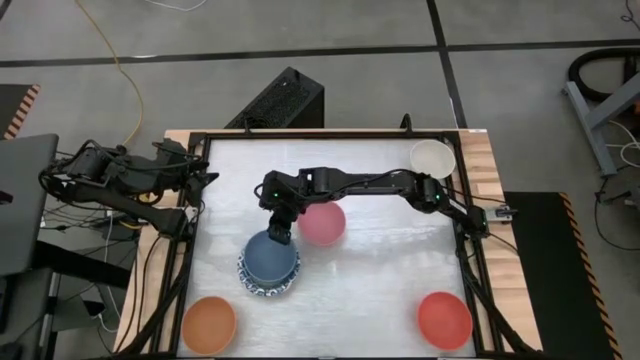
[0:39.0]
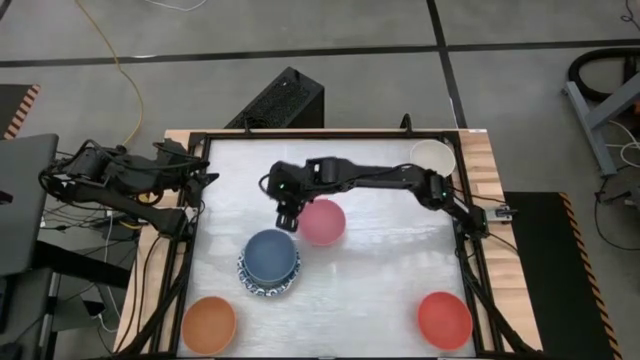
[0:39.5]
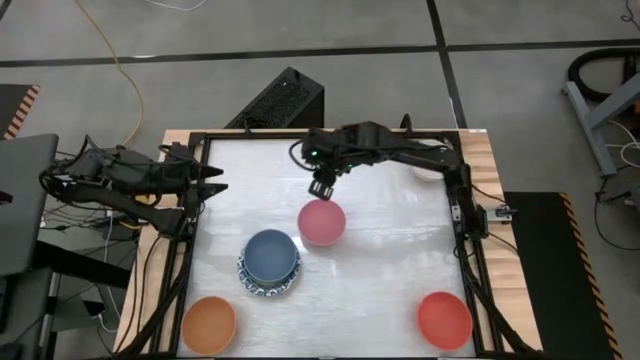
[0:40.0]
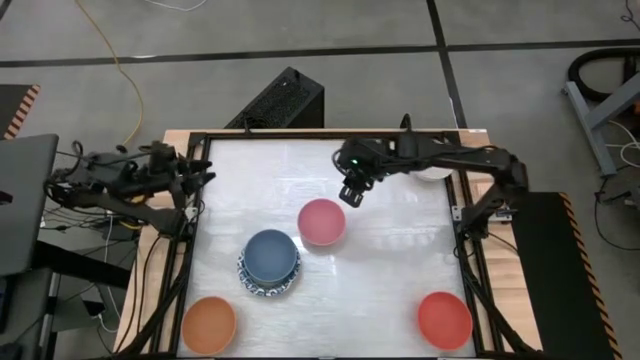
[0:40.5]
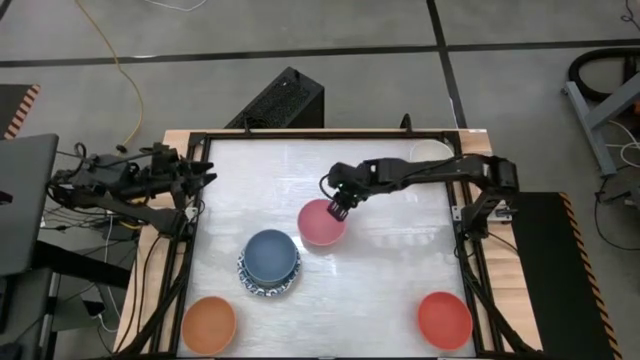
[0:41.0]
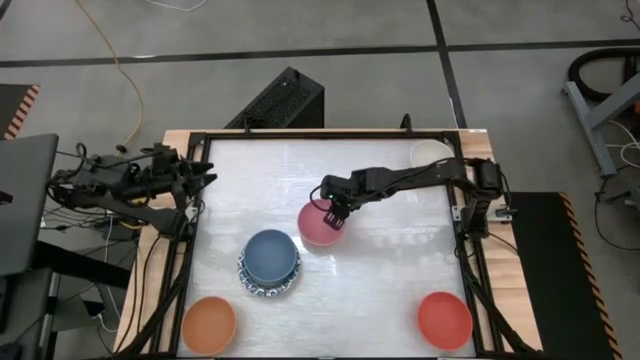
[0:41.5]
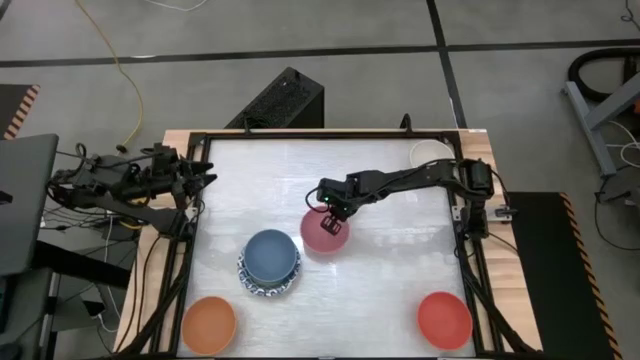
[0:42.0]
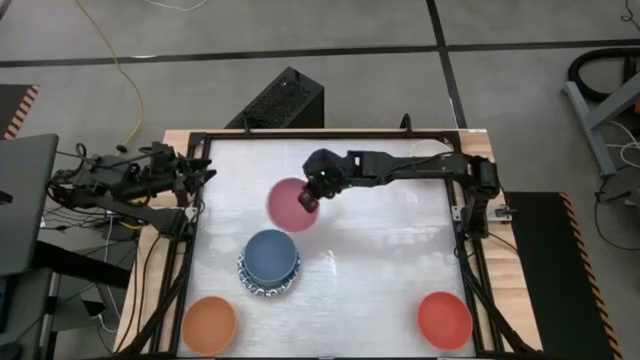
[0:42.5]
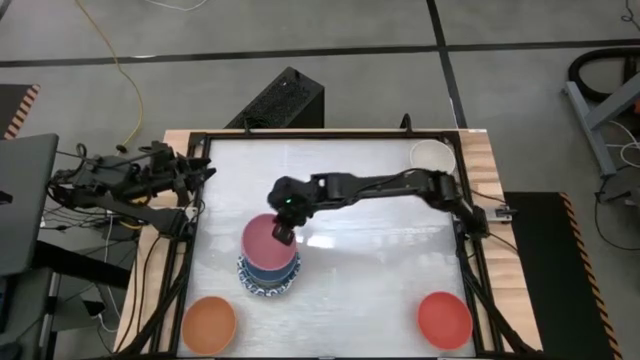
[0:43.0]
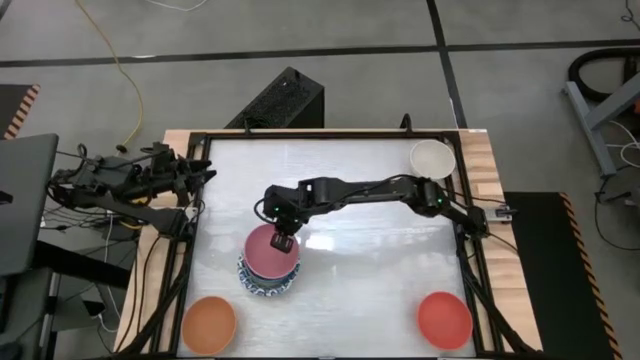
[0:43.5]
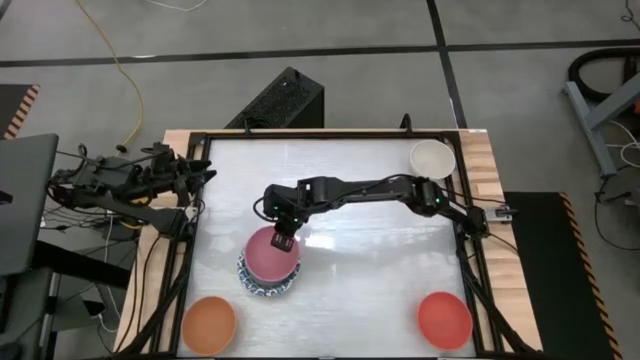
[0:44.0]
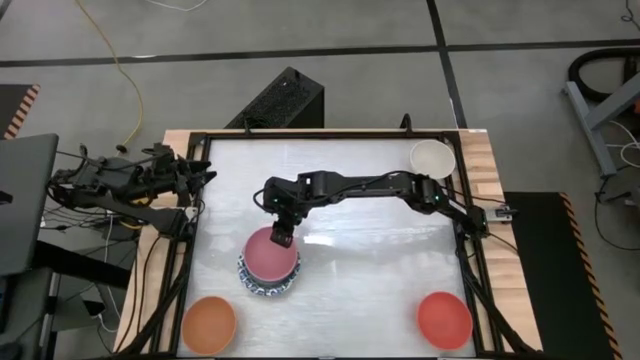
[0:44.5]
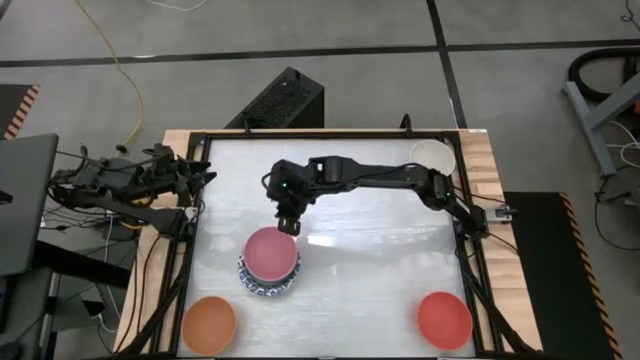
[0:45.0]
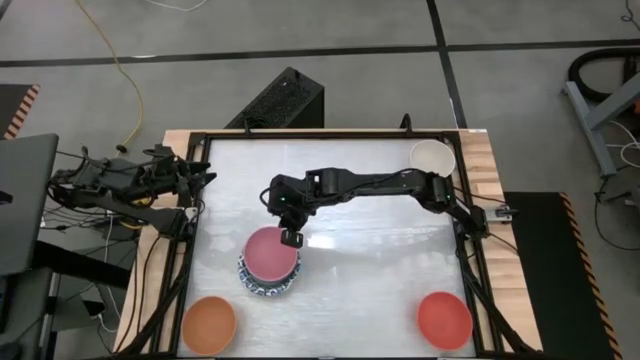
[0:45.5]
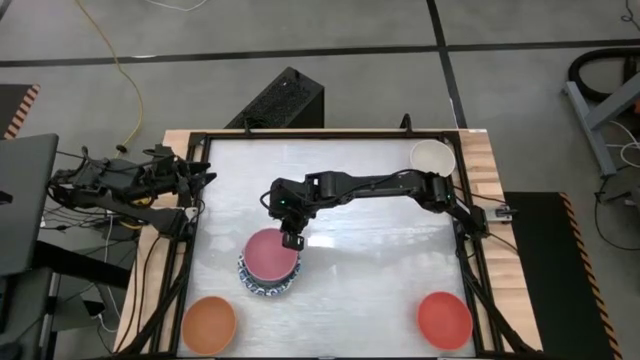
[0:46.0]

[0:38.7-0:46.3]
Stack the pink bowl on top of the blue bowl

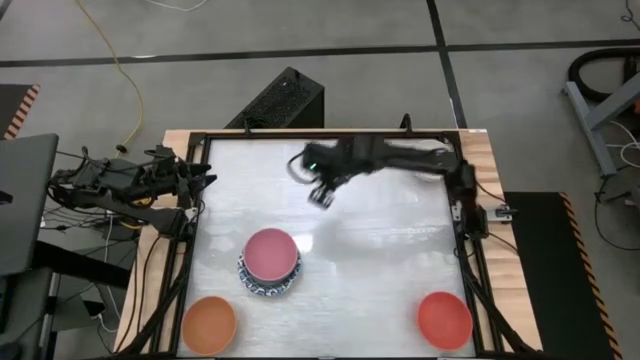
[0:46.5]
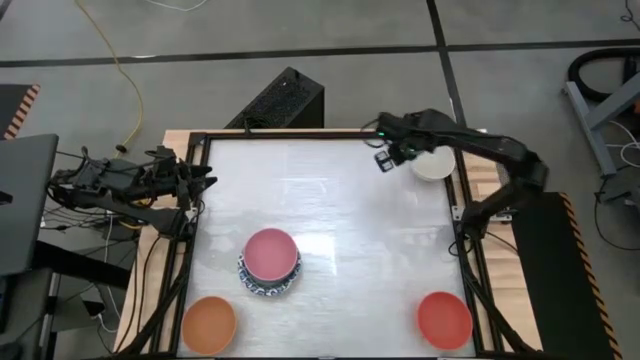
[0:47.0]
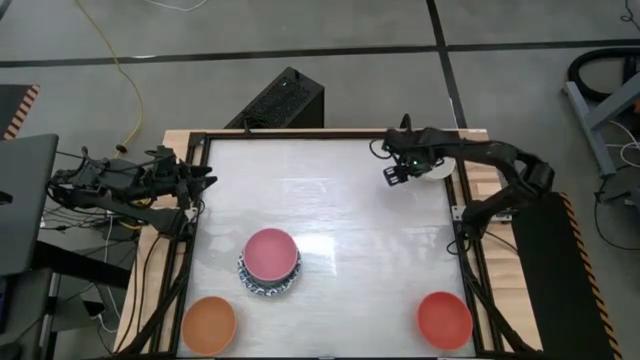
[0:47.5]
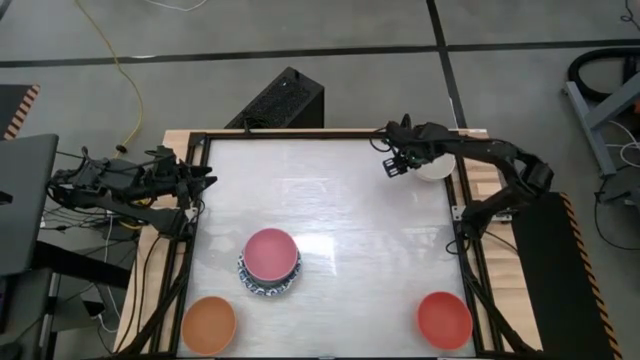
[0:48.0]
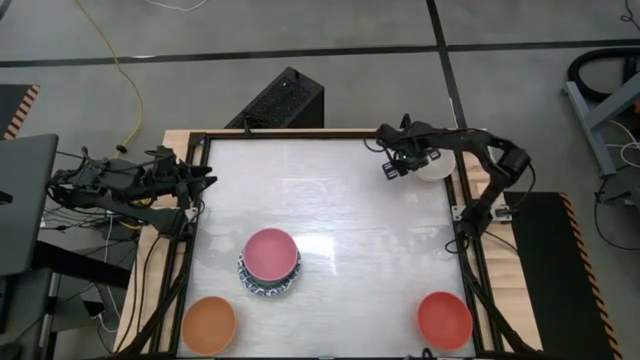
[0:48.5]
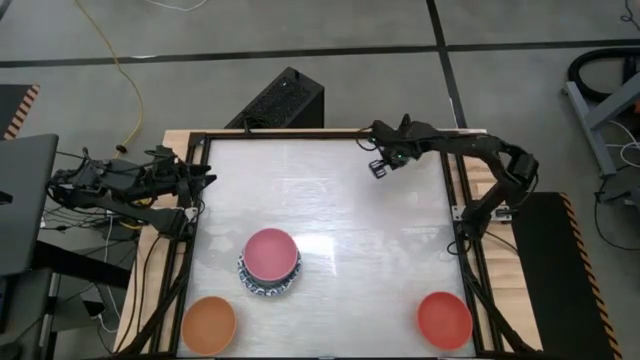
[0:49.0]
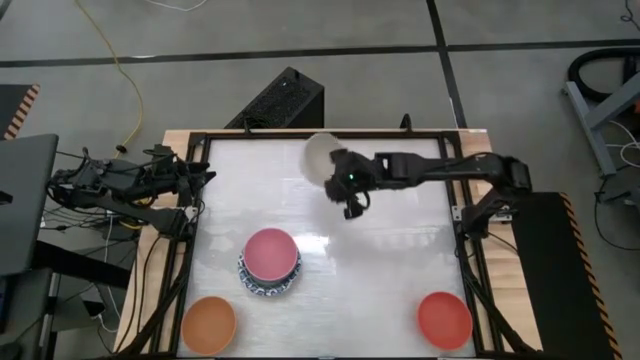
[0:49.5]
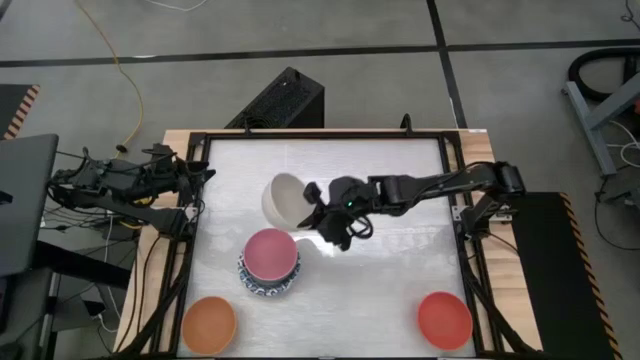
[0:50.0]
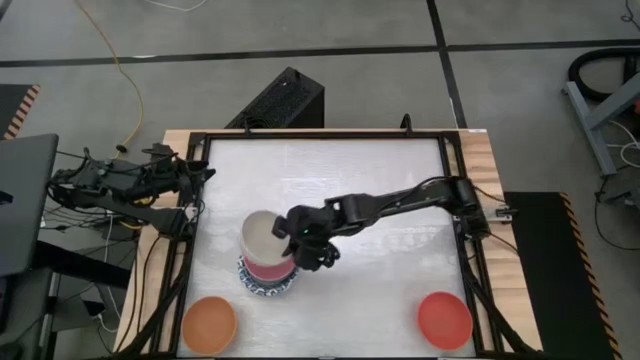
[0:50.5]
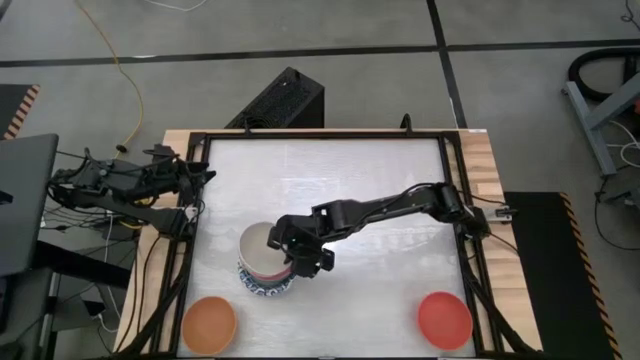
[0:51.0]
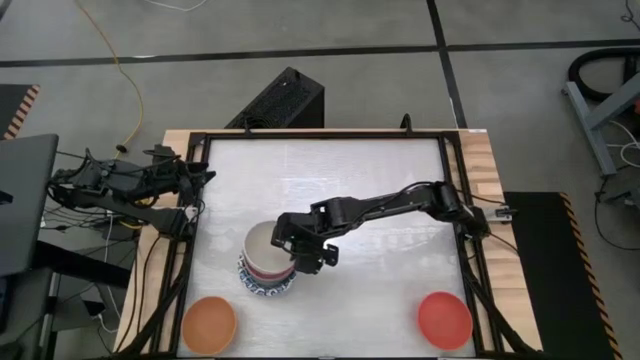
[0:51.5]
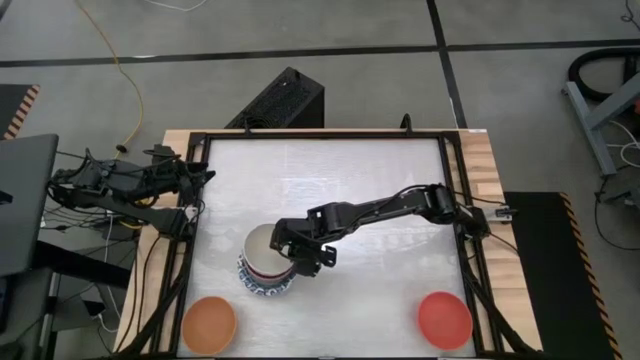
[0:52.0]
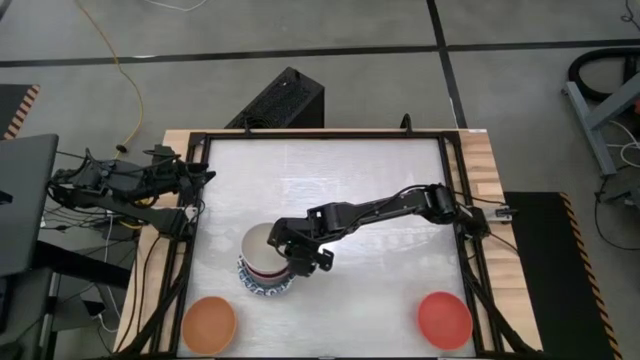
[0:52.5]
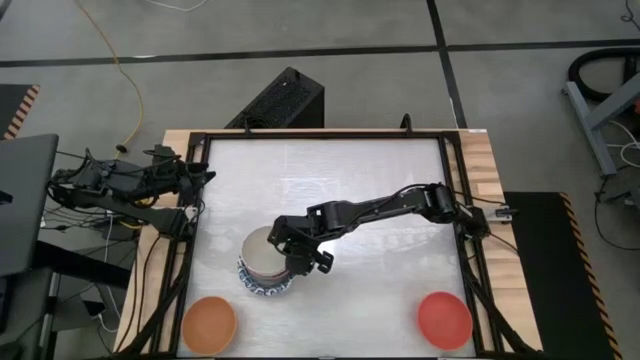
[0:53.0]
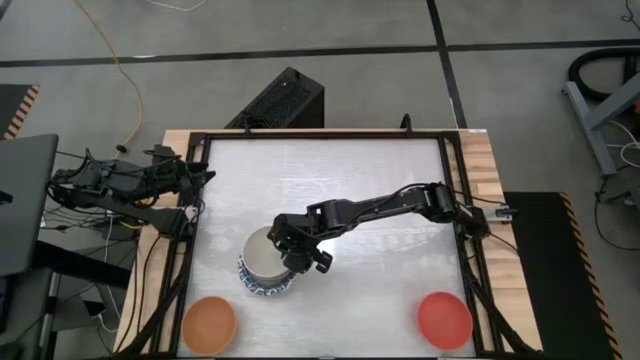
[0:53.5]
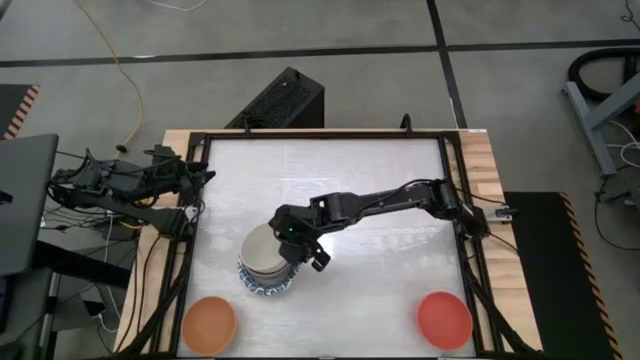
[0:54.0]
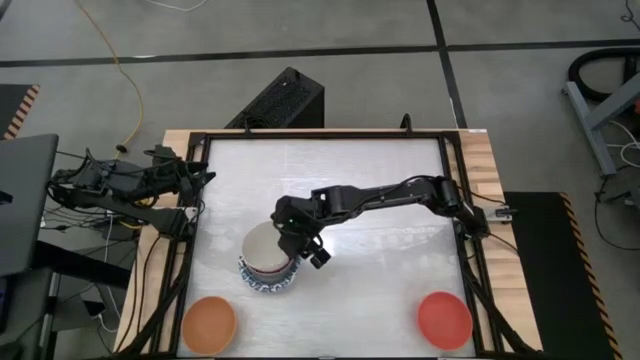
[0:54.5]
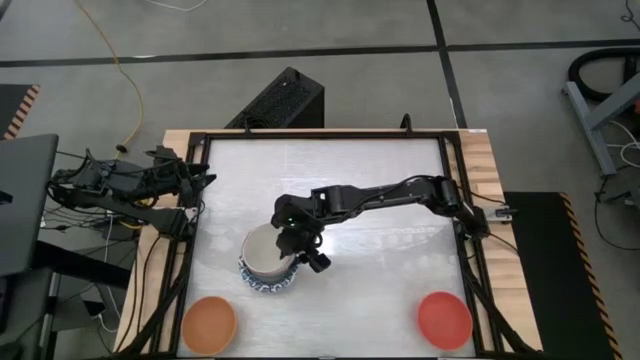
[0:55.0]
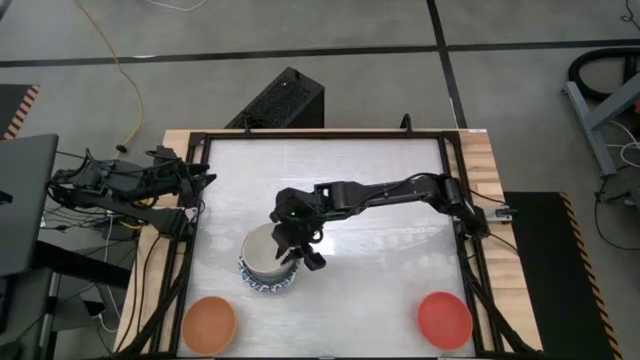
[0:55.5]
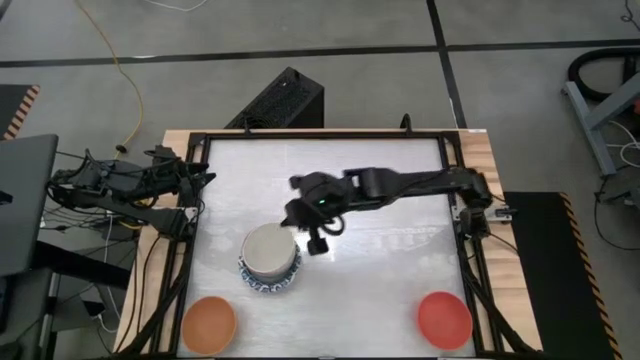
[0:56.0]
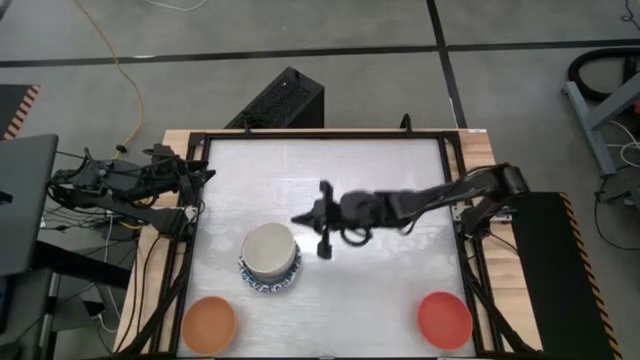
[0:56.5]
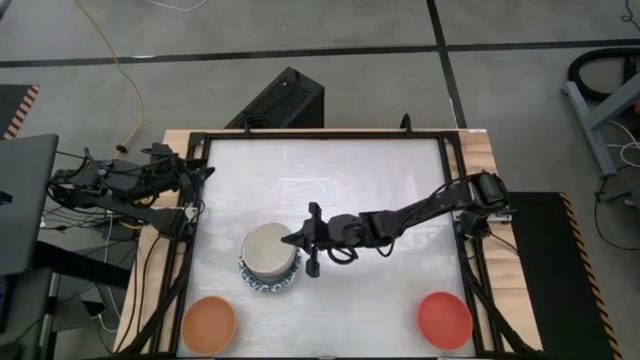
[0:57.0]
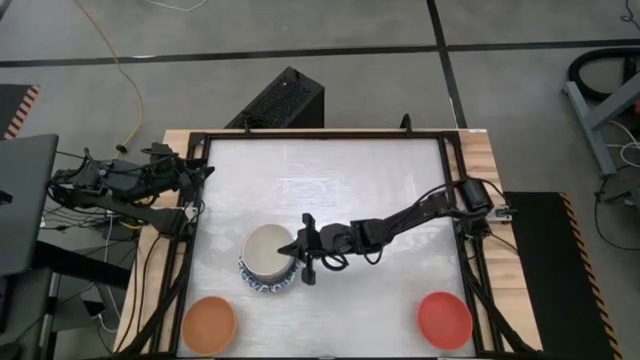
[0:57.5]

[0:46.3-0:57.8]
Stack the white bowl on top of the pink bowl
